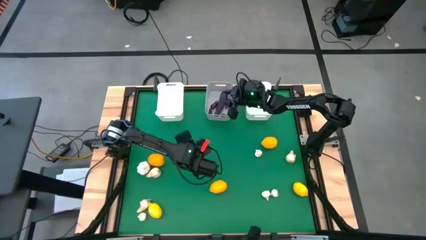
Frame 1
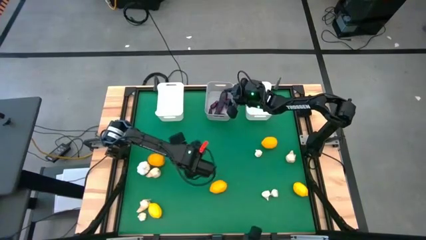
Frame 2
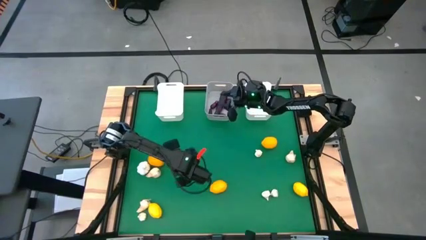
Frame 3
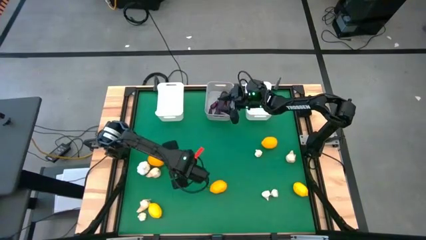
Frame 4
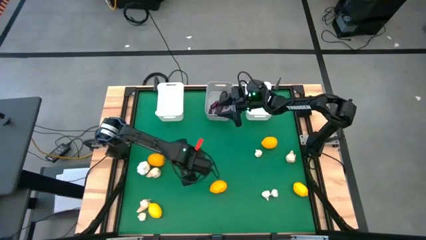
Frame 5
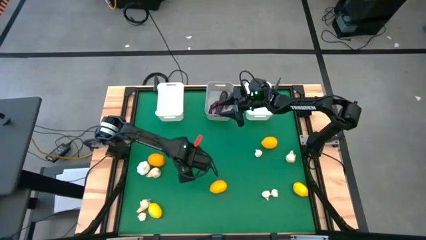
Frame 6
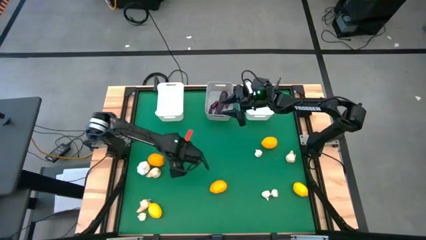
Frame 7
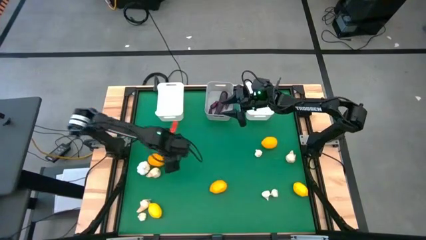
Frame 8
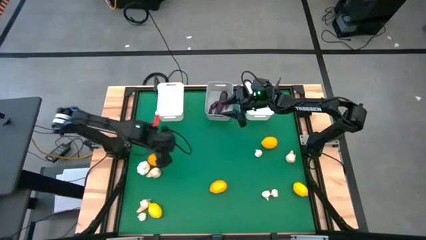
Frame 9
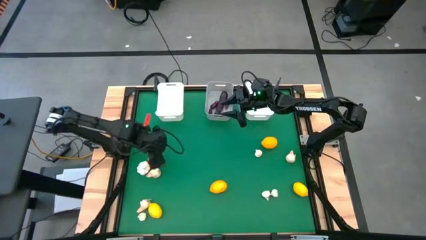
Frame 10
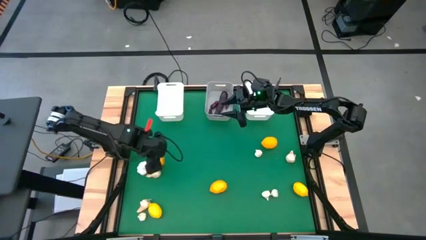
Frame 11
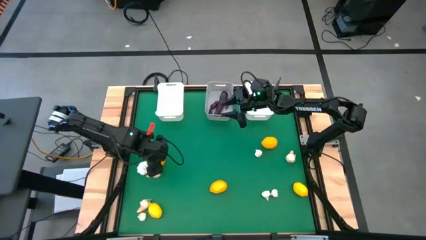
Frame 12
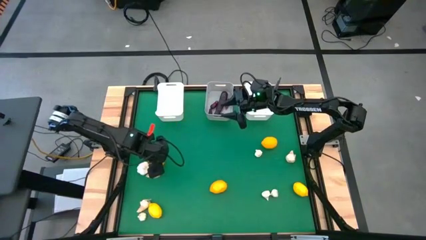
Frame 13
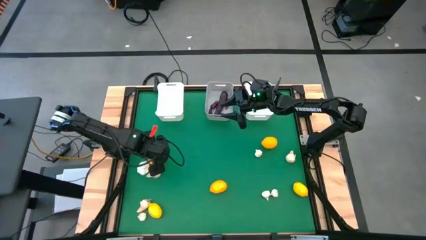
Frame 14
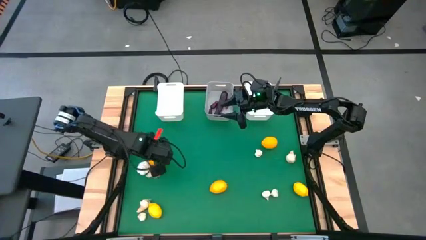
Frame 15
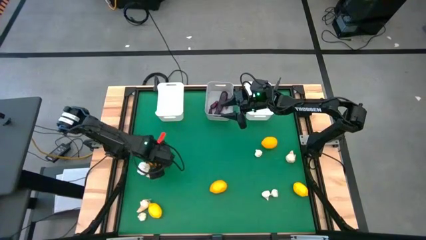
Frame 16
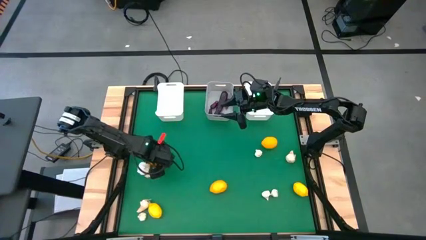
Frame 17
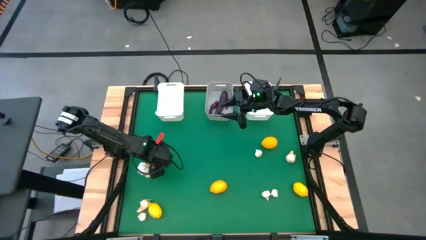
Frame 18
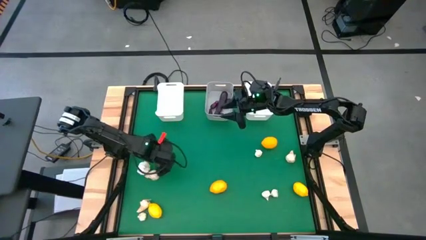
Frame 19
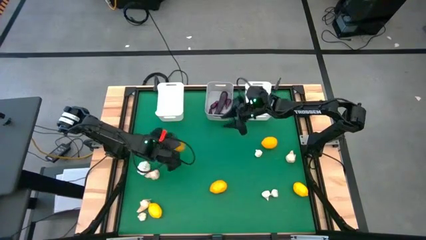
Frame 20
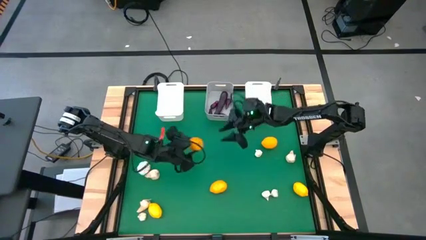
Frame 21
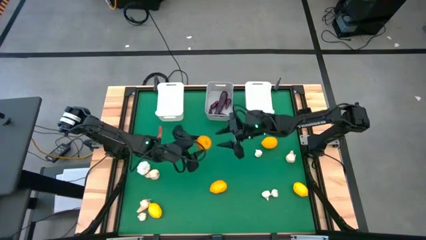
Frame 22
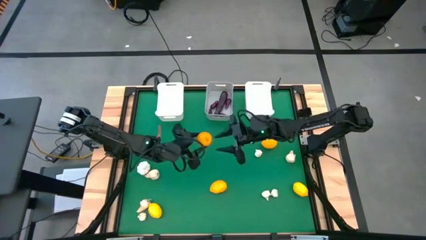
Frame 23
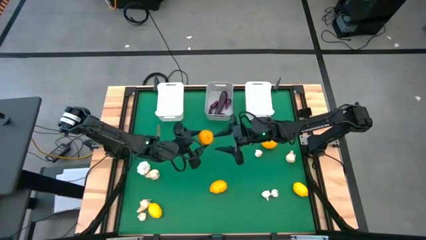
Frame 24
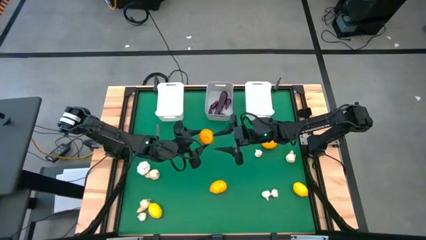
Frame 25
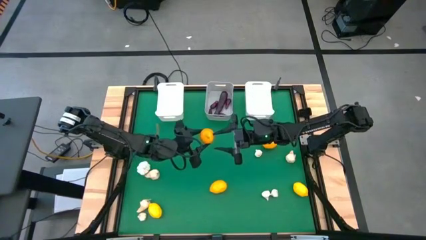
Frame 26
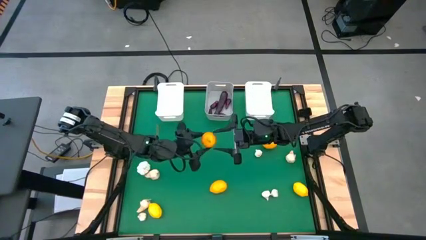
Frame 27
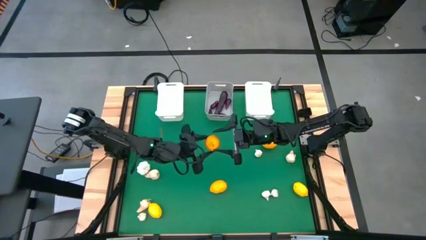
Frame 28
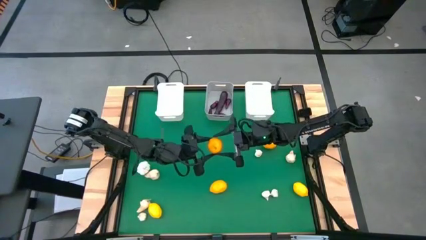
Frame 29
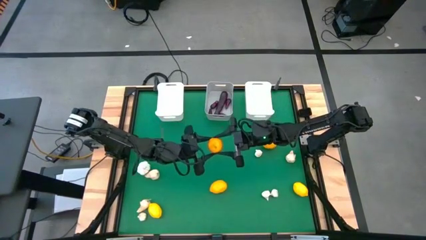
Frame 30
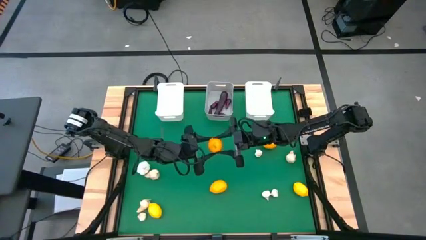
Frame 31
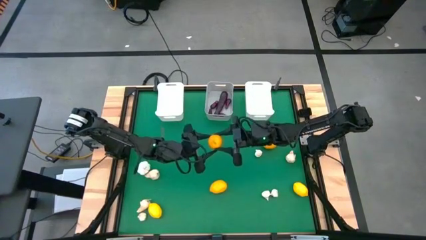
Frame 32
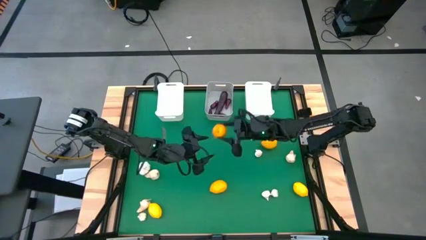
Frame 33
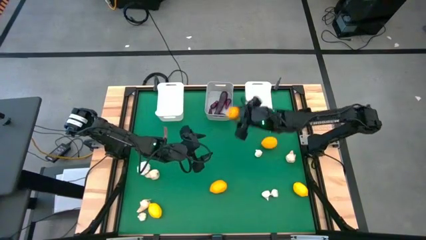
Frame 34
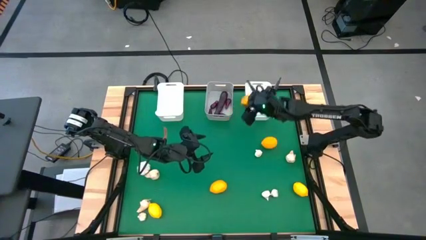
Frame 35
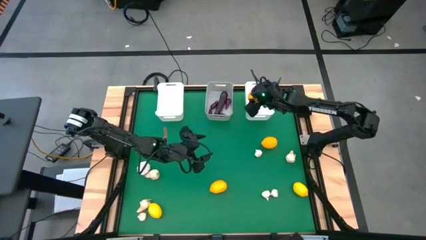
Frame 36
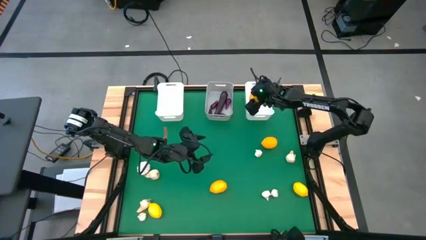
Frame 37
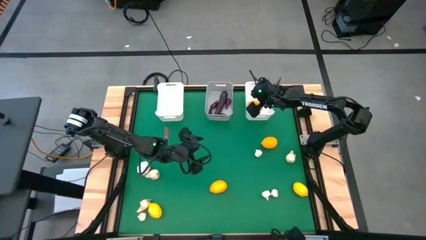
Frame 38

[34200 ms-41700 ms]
Task: Sort produce into baskets
Put the lemon into the right white bin

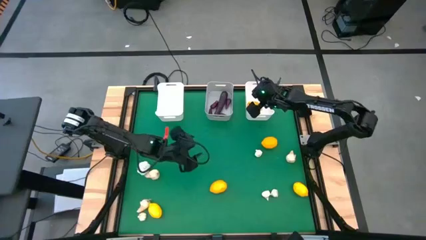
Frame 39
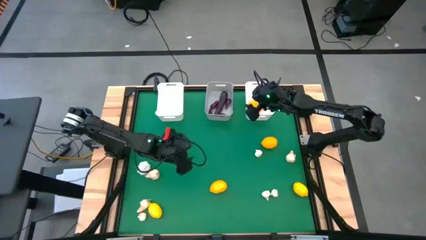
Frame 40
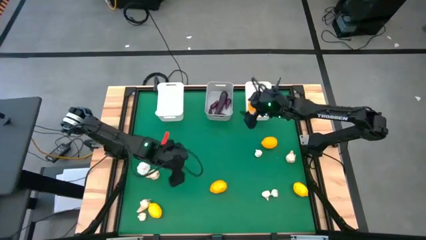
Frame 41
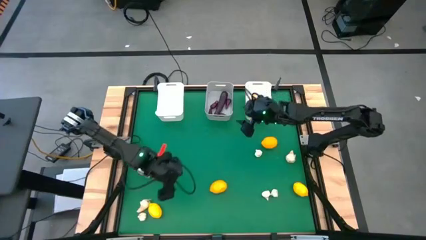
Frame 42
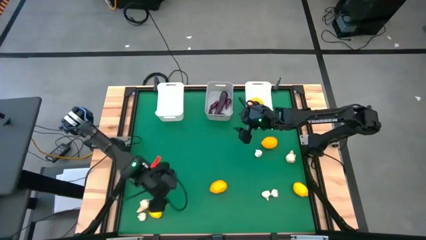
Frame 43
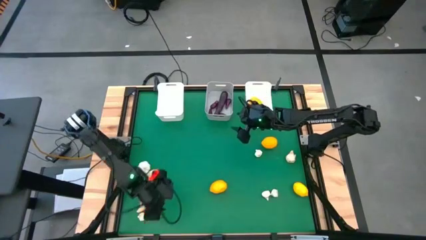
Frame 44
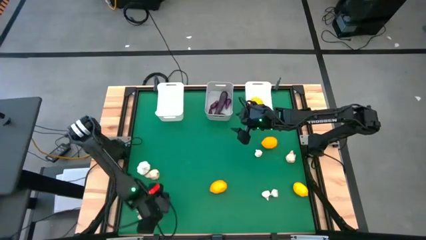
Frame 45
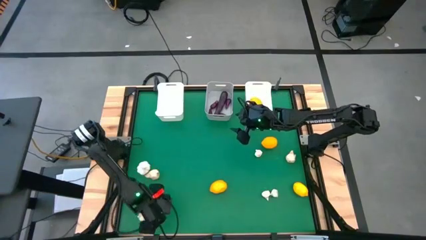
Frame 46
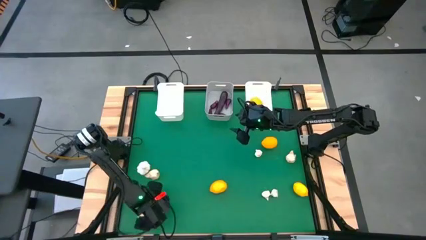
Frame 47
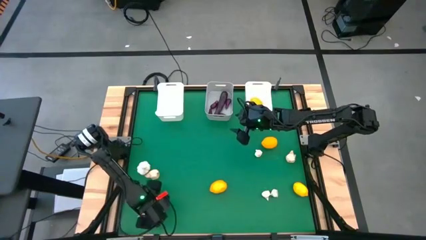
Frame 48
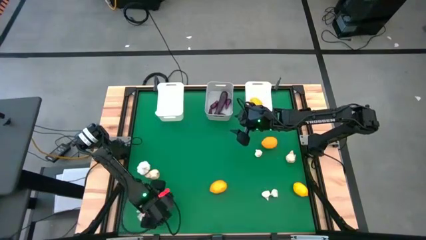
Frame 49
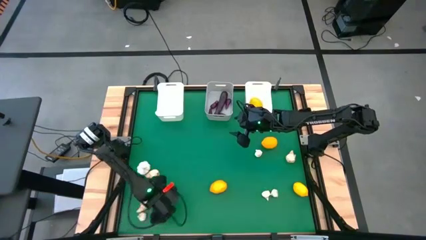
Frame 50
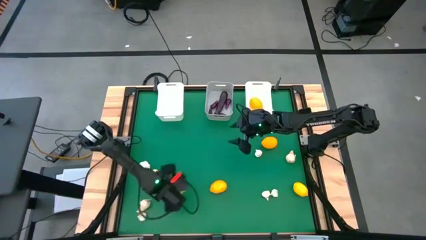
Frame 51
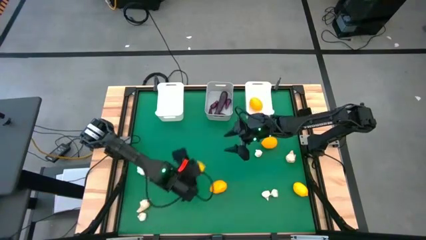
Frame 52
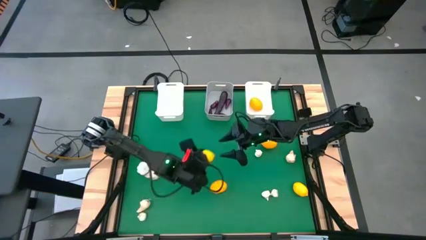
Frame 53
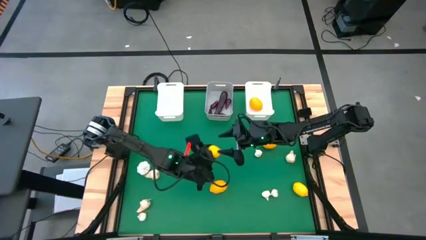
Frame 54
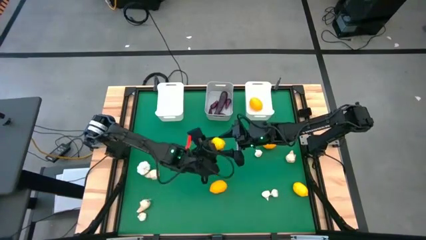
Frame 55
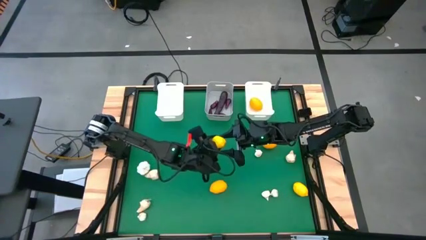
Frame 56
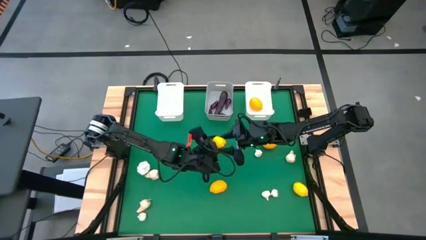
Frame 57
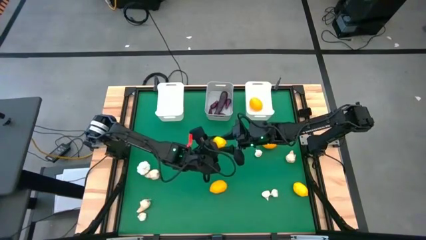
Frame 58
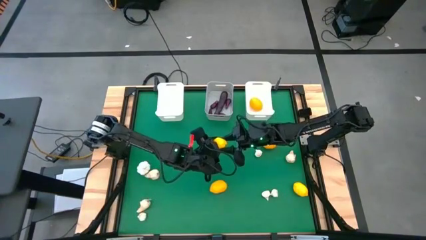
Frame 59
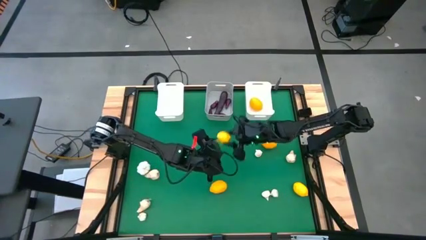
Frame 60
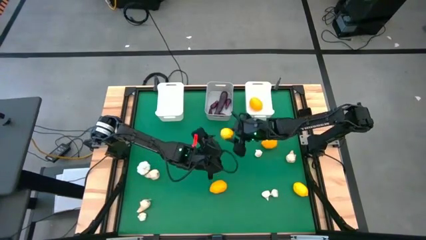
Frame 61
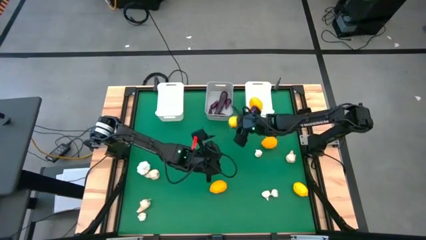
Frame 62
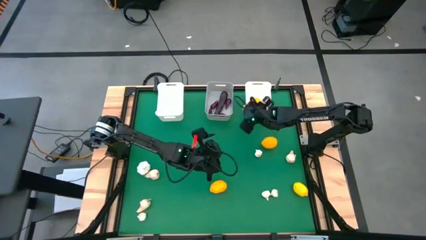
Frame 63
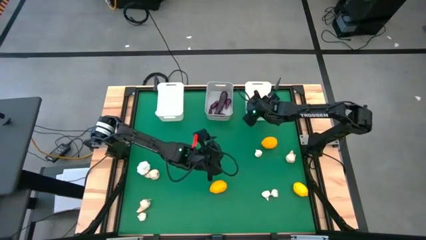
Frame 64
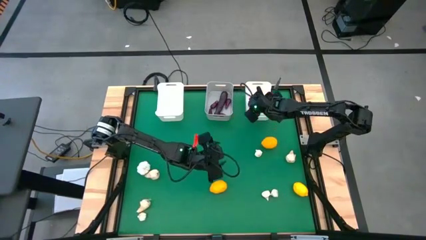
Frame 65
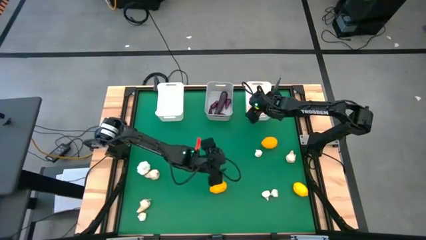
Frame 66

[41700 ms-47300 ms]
Put the lemon into the right white bin

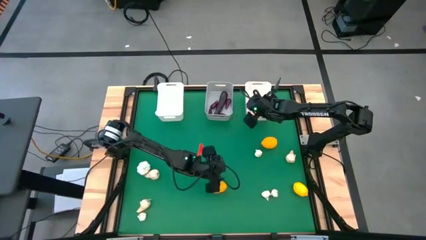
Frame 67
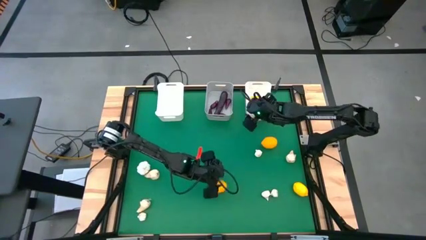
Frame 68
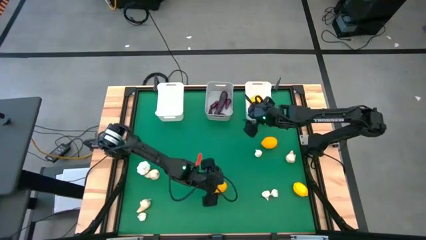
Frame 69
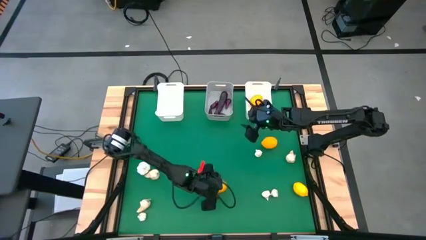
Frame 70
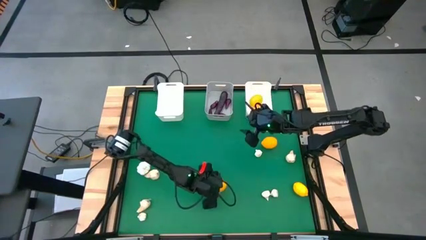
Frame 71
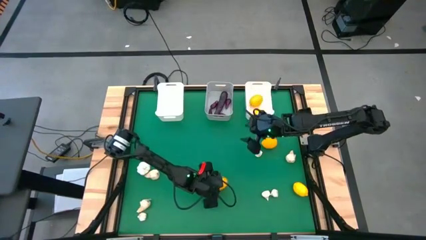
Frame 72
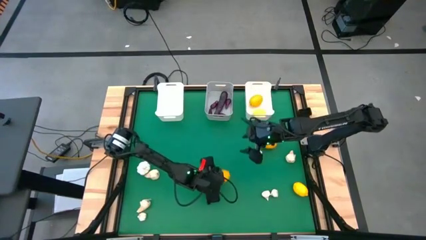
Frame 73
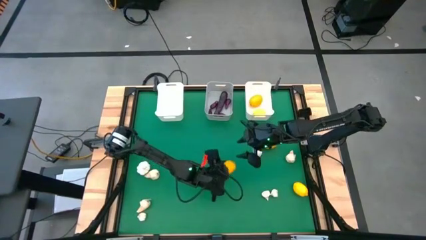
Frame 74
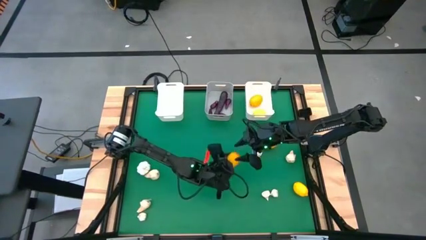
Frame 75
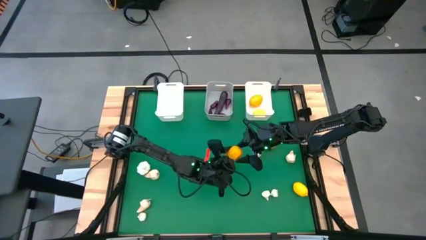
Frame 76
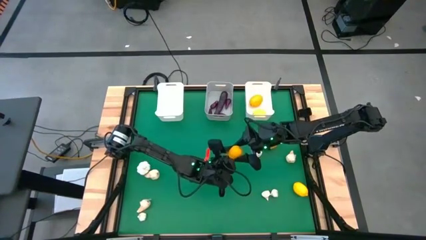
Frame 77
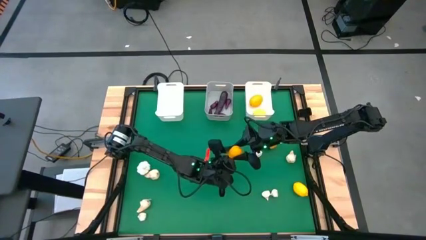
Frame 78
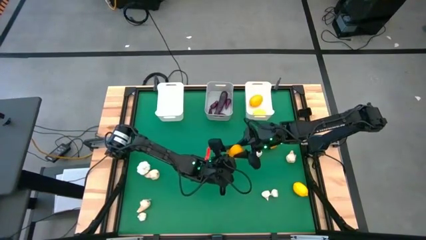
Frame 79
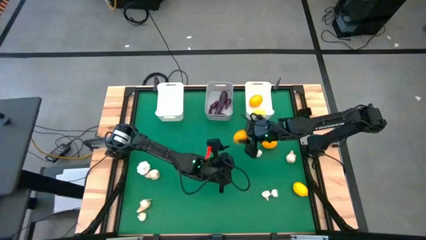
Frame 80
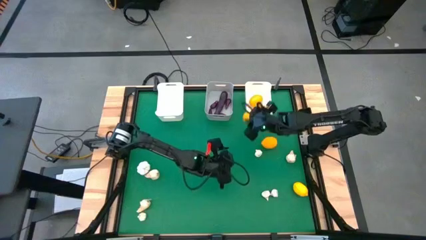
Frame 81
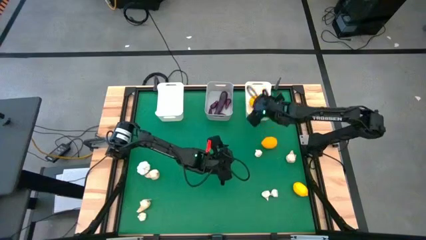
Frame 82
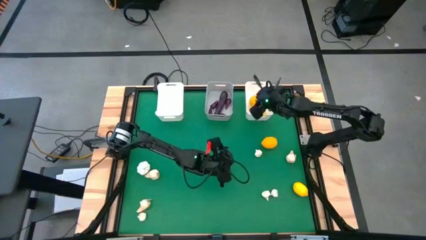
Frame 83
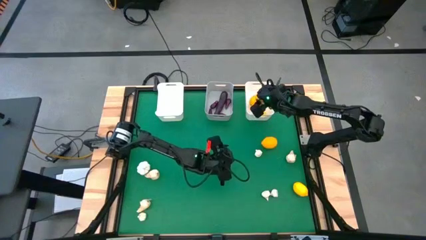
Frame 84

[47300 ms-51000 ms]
Put the lemon into the right white bin

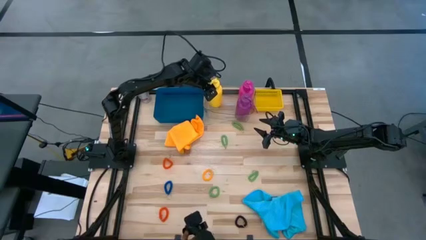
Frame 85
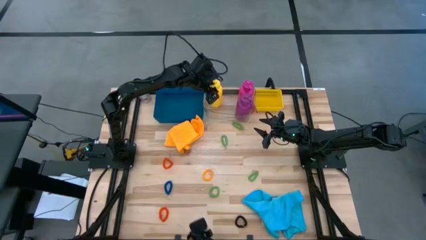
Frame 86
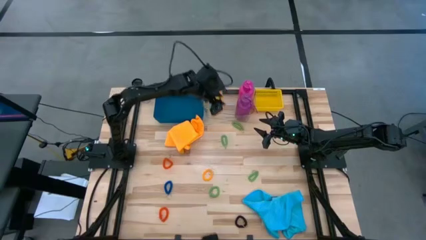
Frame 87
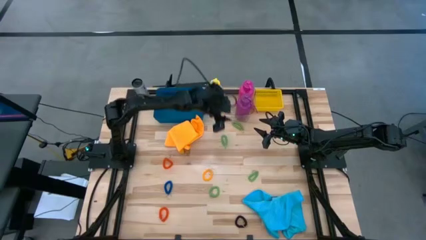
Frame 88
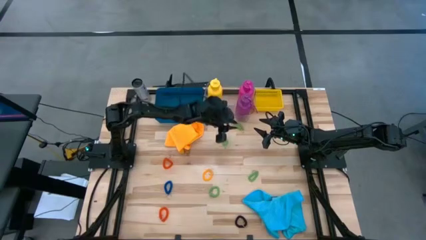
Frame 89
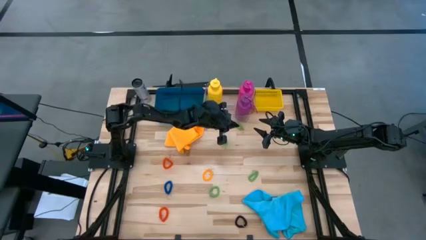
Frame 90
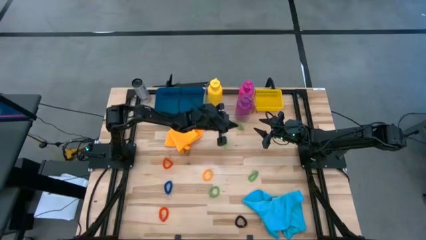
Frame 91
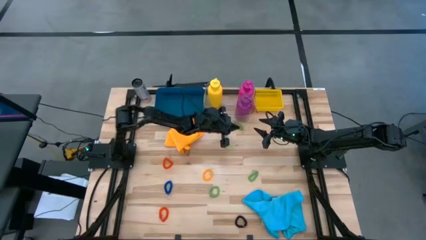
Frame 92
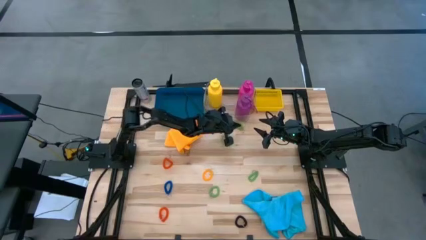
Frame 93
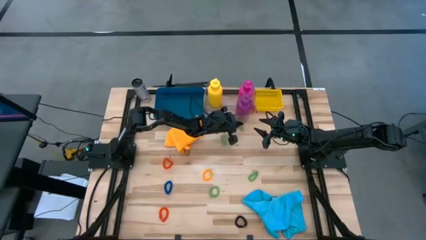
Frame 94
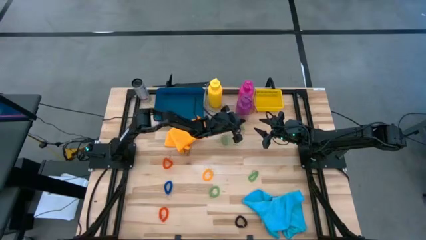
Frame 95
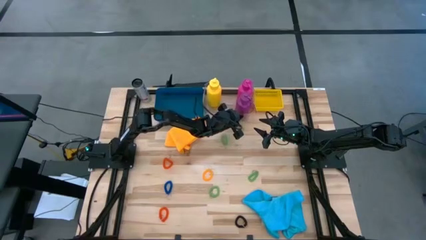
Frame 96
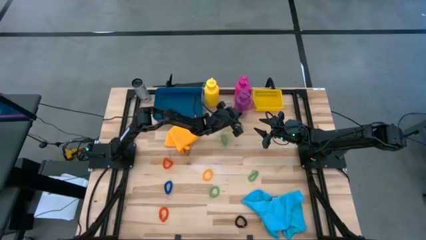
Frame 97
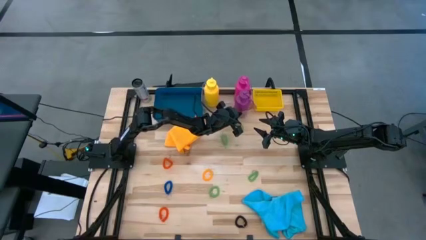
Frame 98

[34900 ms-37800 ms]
Task: Pick & Place Sports Items
Adjust the transparent bin to align with the other bins
